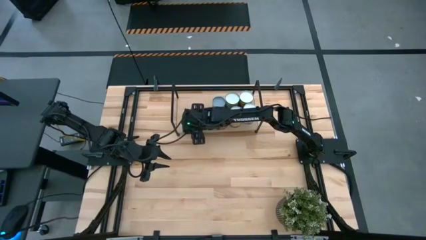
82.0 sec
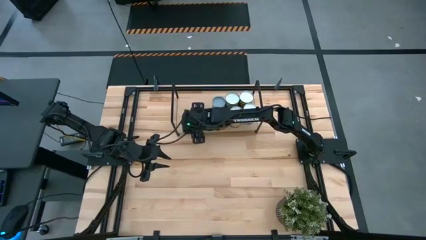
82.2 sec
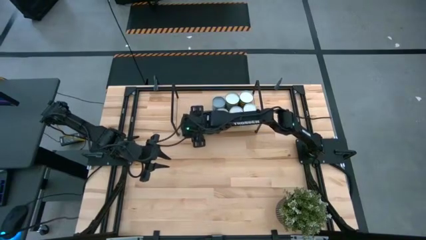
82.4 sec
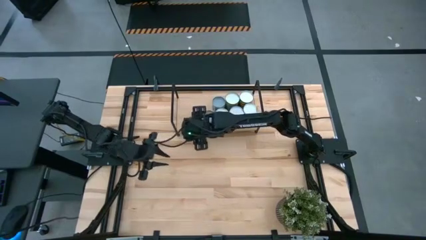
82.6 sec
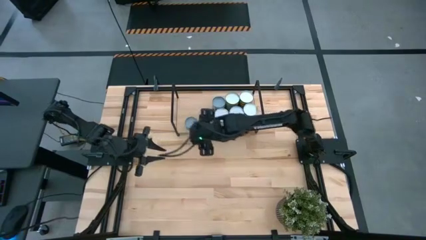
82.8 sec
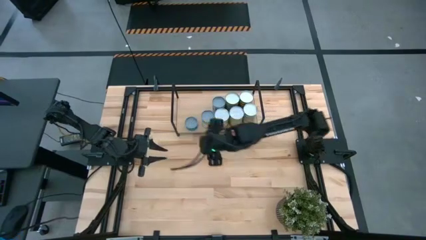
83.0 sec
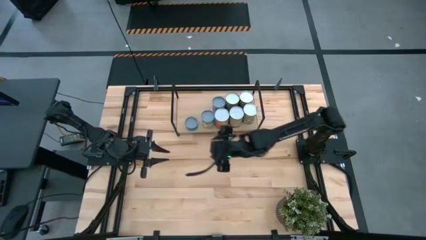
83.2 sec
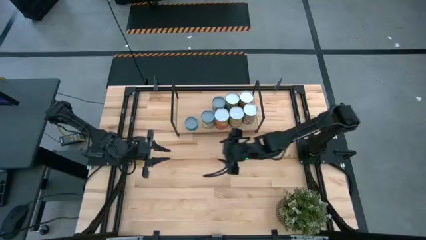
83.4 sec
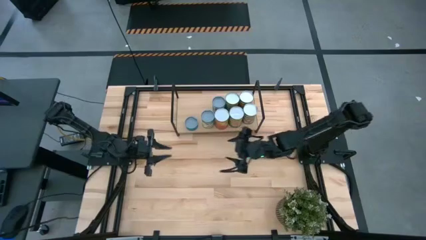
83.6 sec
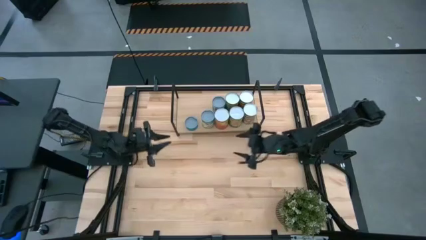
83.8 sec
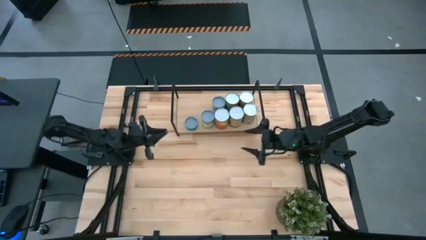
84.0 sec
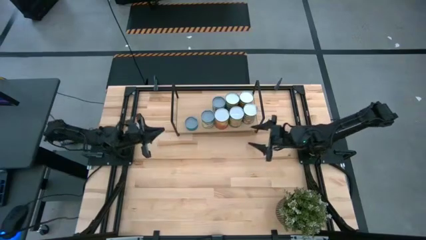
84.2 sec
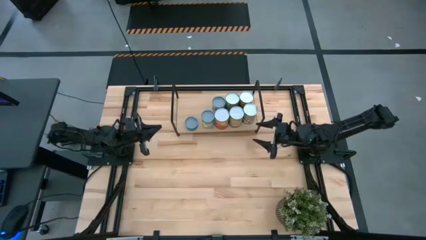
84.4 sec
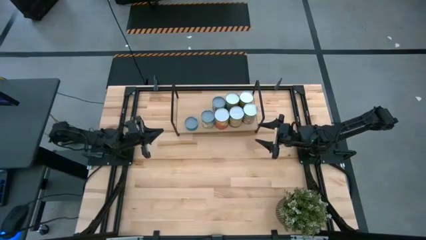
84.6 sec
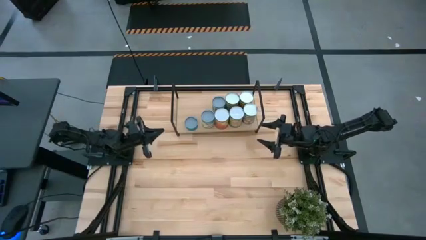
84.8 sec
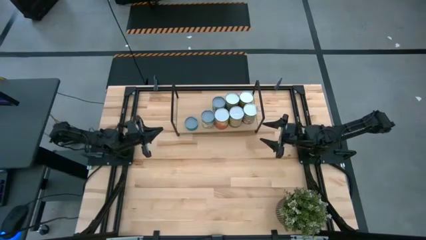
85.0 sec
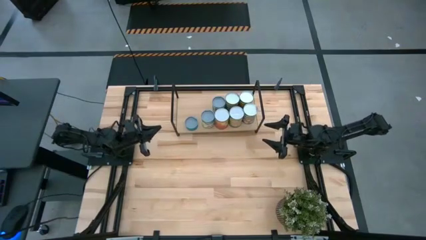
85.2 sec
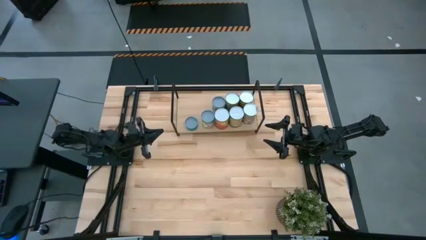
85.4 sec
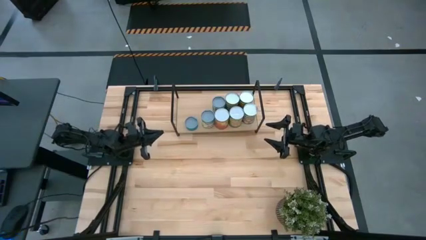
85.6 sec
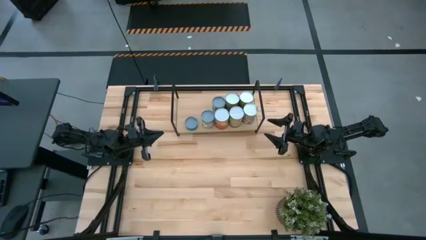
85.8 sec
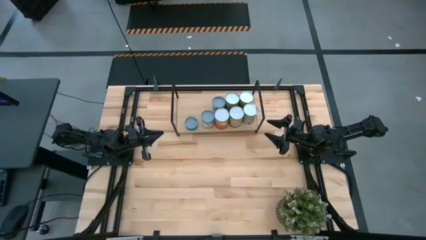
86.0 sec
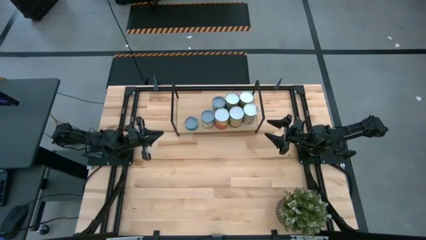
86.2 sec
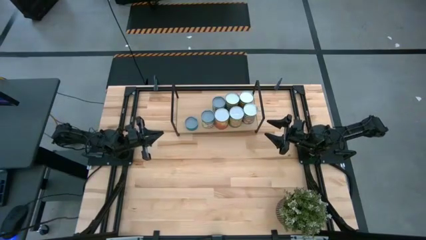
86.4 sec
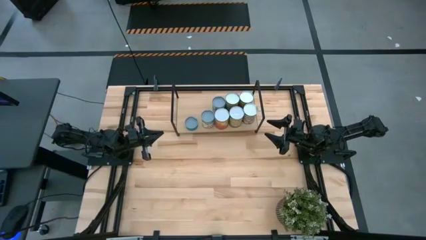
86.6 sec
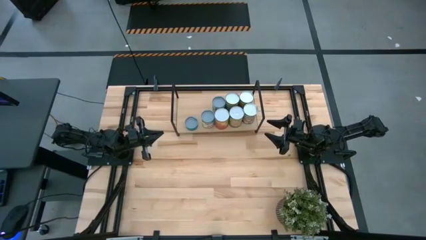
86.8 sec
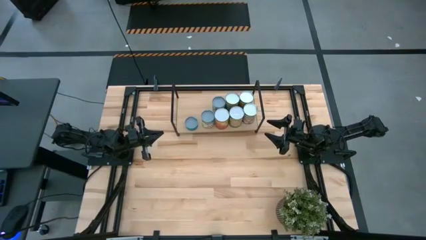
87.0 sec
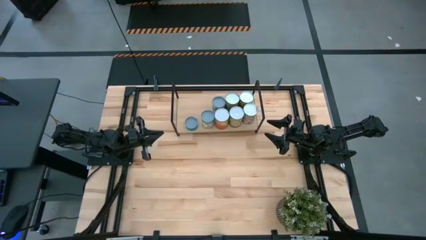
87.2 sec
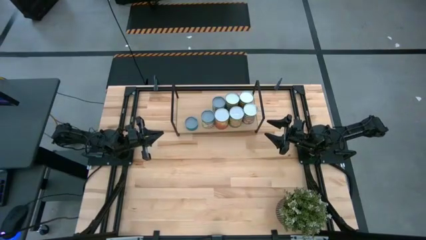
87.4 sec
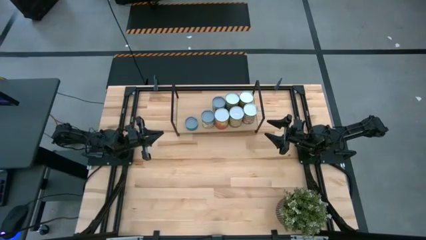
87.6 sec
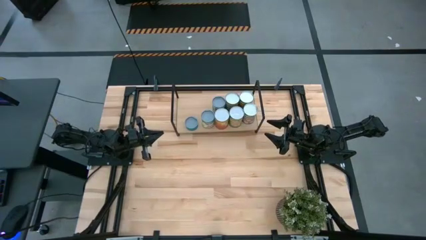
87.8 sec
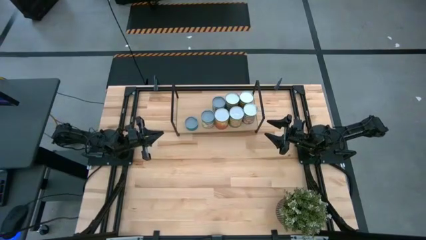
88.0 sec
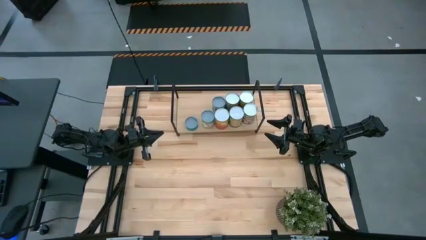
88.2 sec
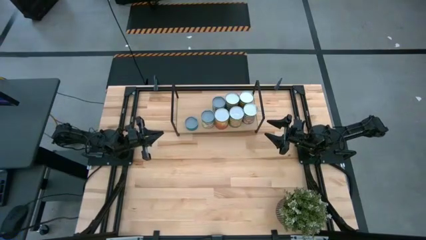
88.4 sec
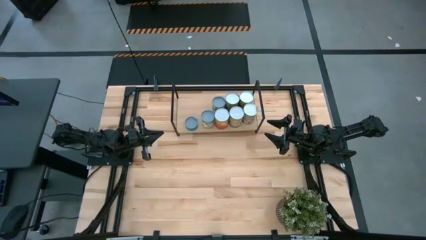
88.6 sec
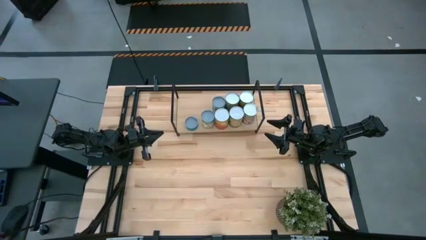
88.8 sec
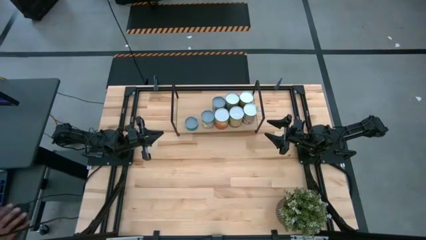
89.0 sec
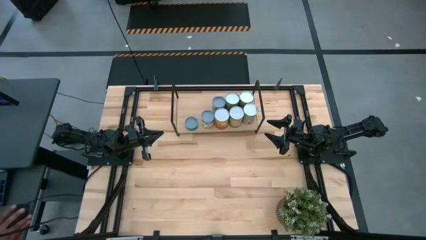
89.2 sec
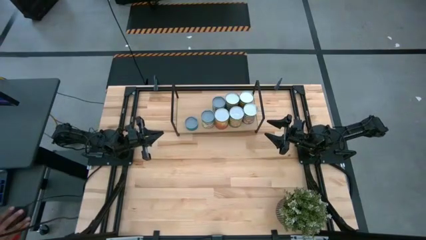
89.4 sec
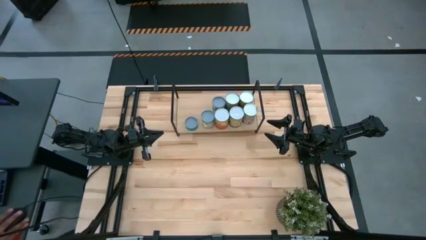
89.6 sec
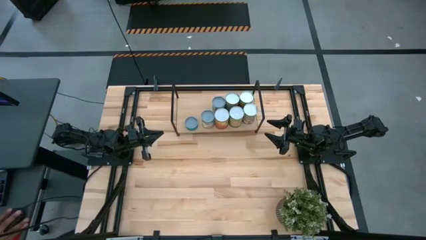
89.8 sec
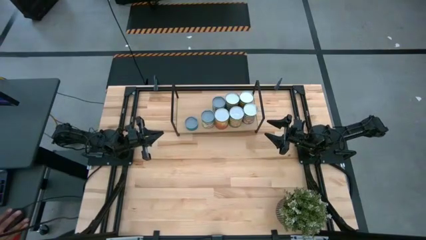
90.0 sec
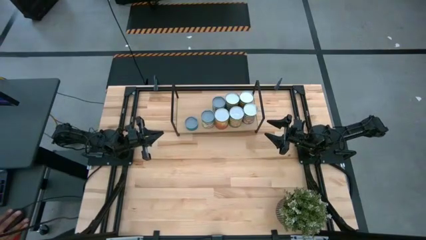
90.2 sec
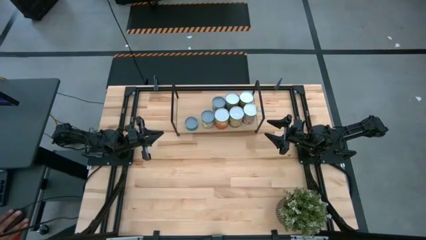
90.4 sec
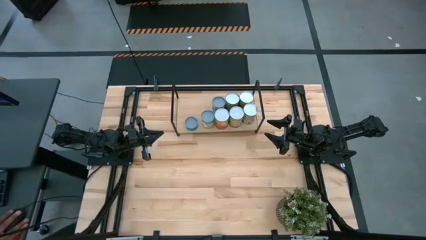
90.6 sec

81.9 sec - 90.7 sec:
Task: Pick and place cans onto a shelf
Return to Home Position

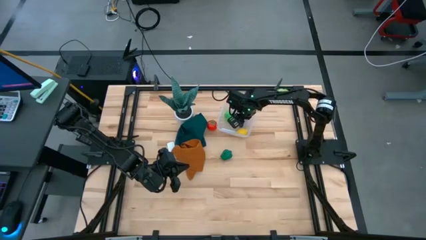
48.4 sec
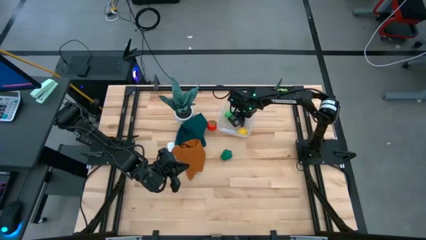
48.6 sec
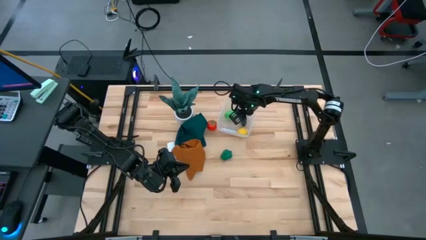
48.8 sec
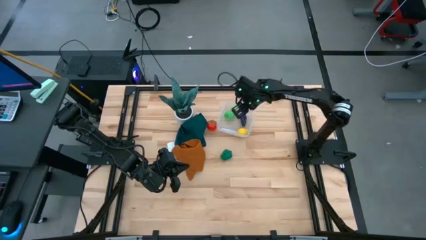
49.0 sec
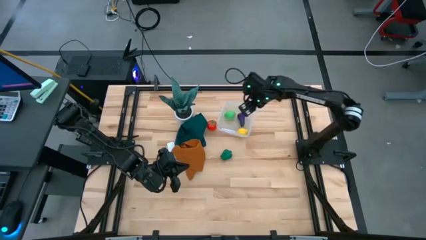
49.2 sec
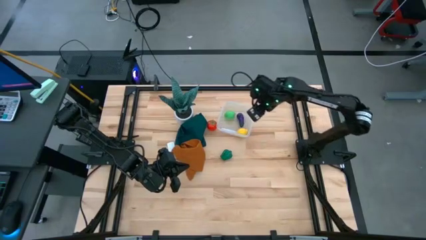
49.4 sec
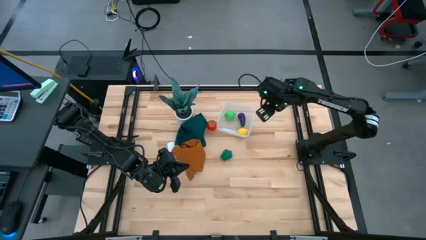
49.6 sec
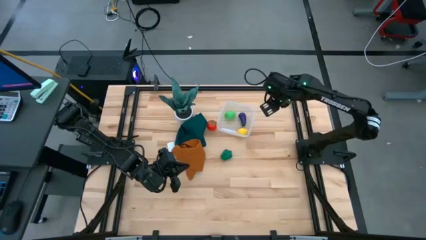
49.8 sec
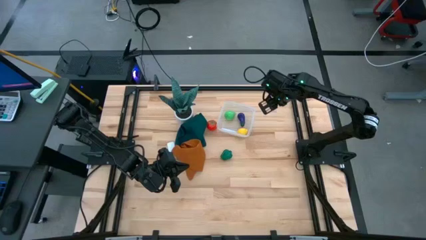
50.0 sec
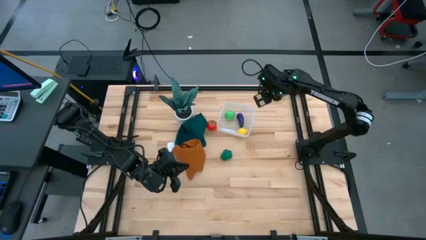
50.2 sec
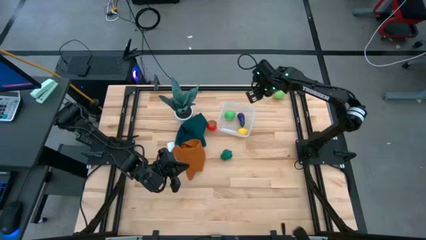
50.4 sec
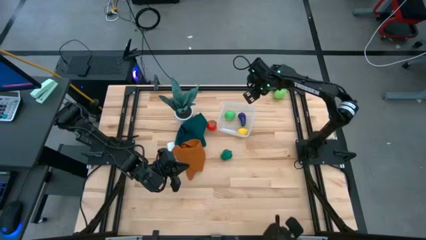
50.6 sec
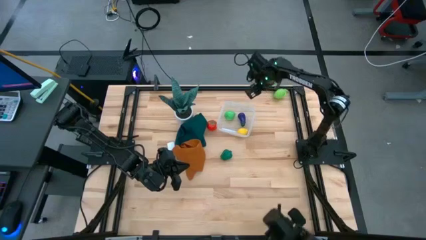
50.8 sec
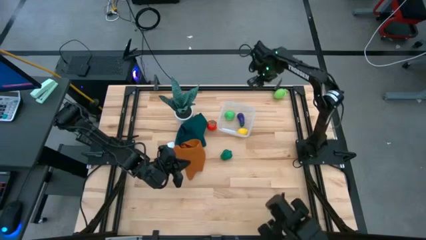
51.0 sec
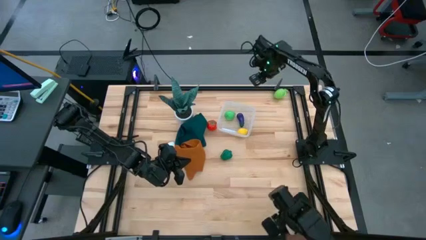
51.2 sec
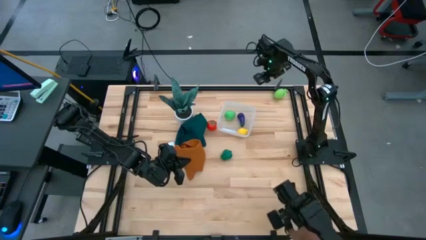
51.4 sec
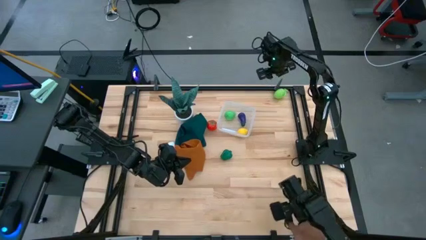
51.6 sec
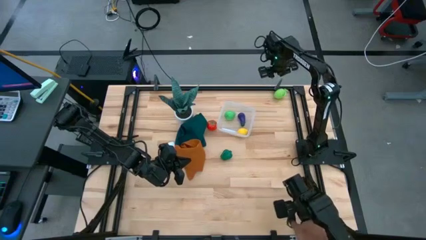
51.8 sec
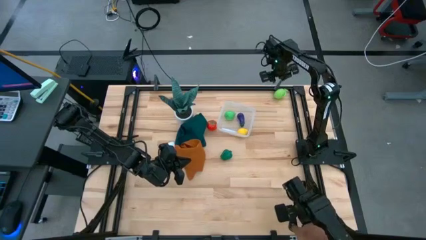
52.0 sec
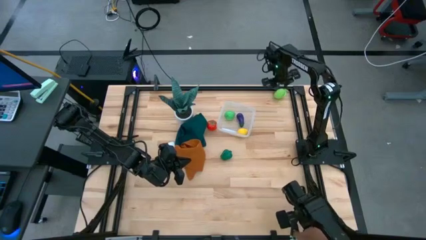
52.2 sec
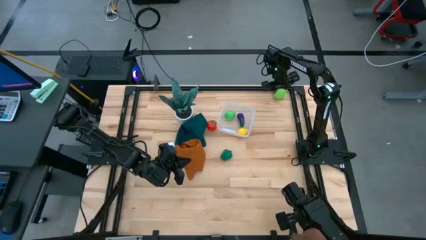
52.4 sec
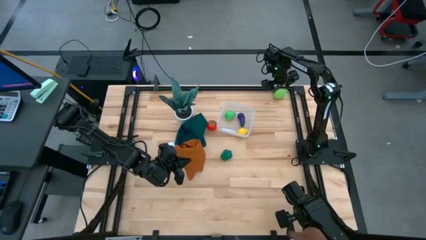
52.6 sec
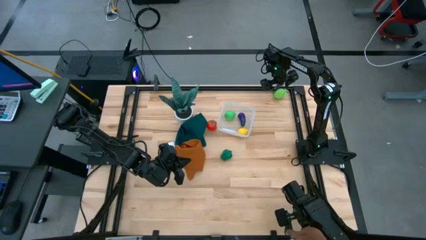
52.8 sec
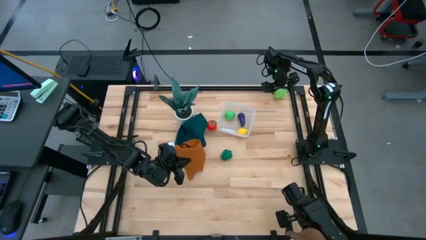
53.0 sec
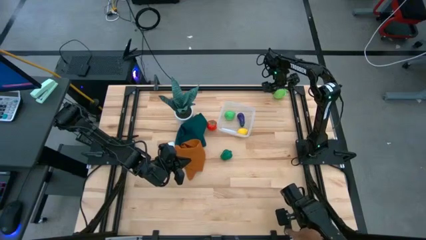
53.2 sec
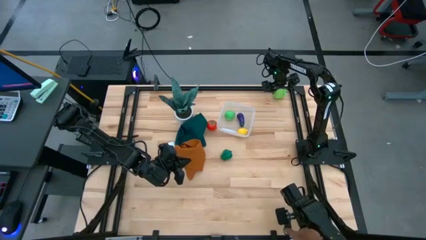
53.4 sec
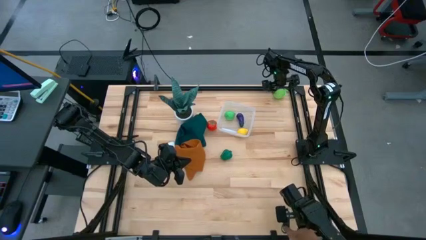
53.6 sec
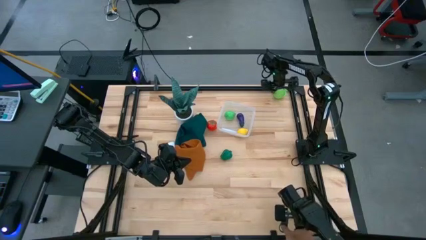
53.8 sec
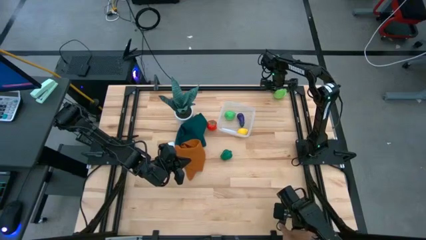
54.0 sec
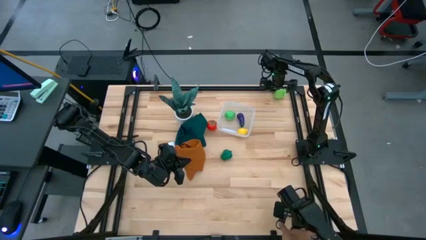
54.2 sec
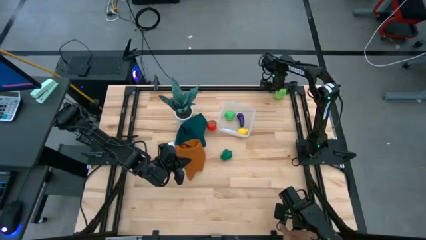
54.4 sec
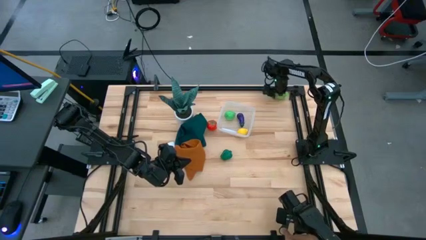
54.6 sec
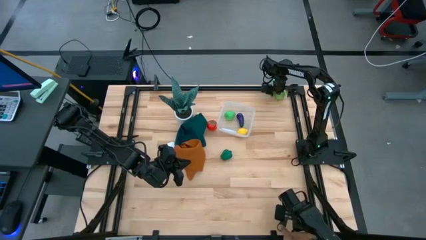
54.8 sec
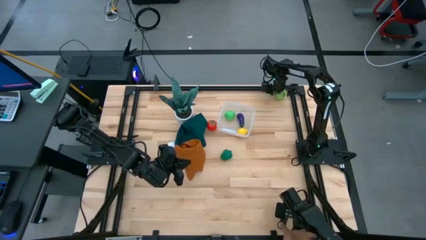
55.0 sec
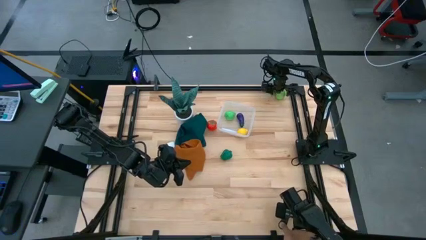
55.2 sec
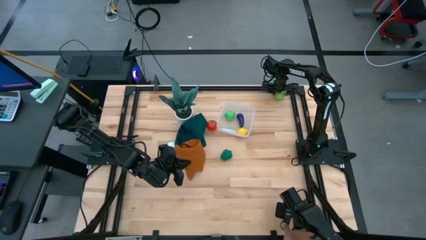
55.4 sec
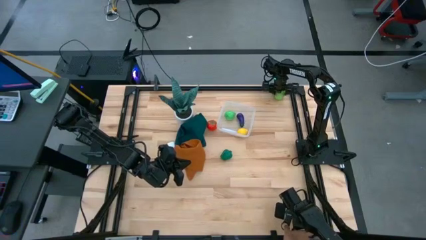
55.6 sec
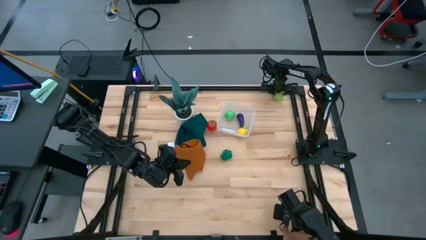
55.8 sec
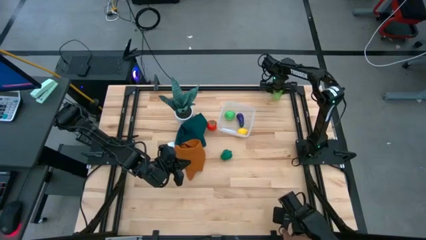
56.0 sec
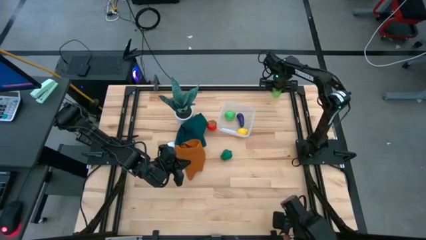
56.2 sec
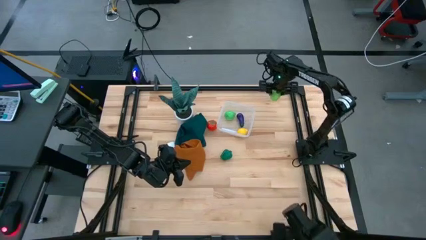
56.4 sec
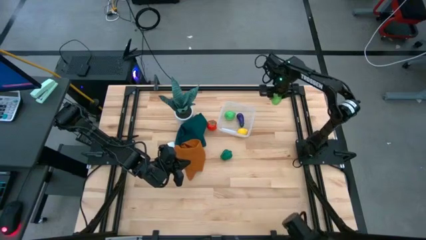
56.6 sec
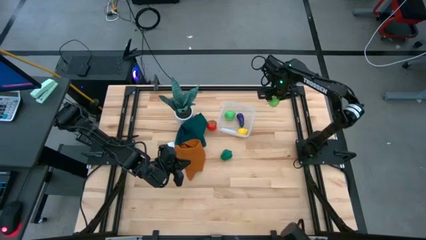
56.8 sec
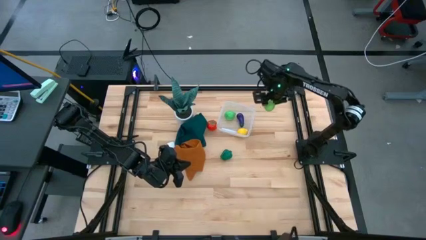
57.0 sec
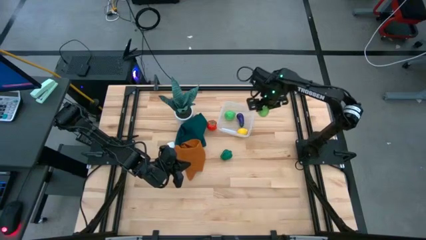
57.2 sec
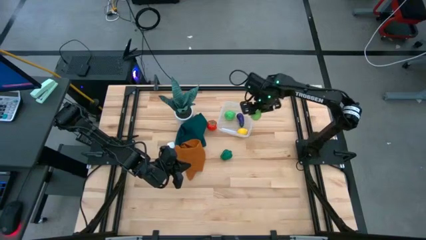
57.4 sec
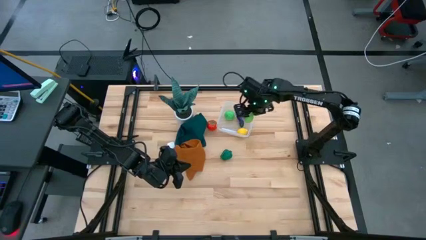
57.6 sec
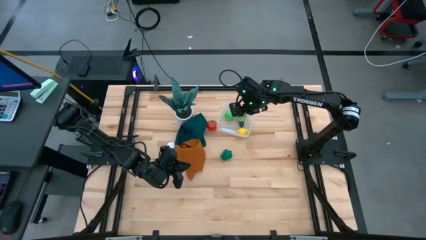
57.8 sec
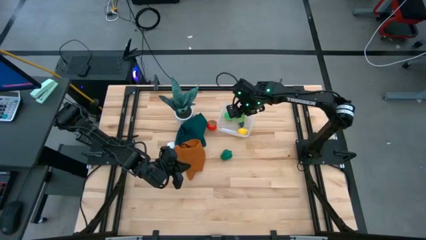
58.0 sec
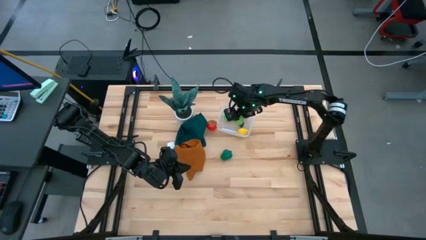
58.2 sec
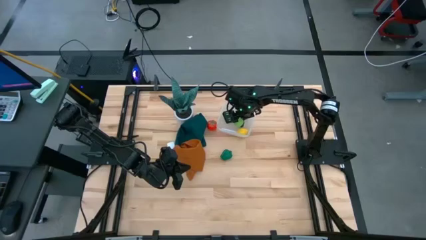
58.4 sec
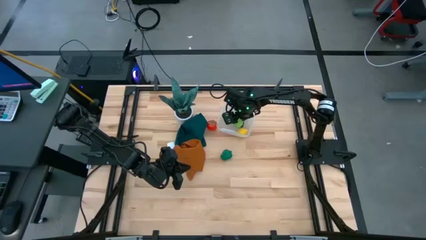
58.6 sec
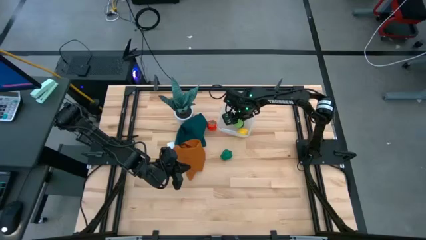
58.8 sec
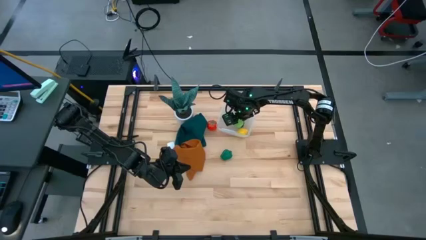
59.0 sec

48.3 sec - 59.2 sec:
Task: Pick and placing Produce into tupperware
Put the green cantaloupe into the transparent bin
